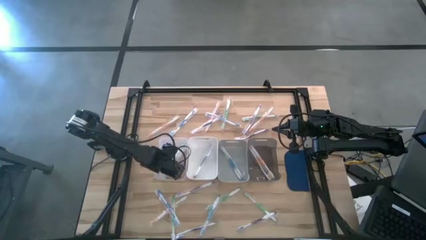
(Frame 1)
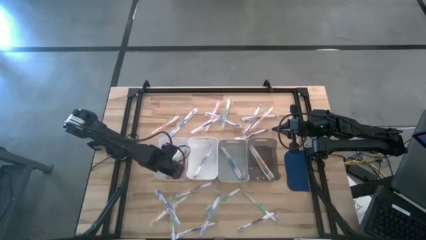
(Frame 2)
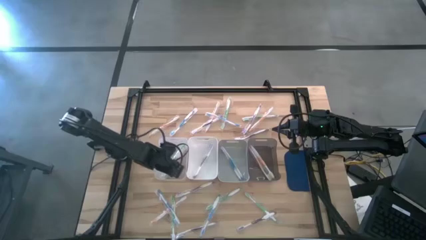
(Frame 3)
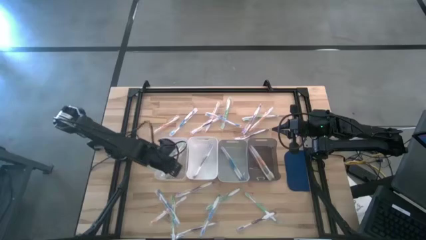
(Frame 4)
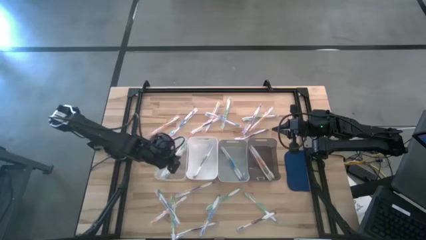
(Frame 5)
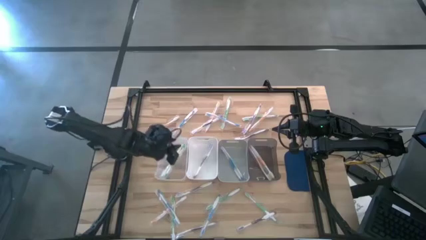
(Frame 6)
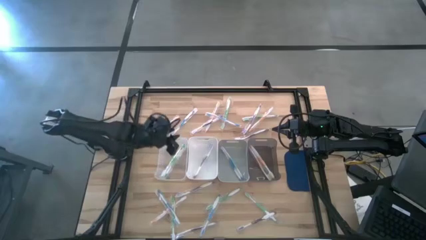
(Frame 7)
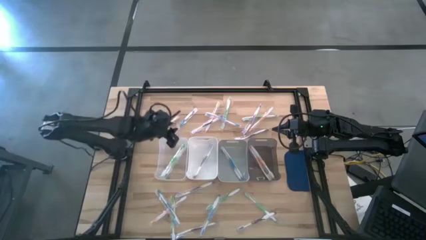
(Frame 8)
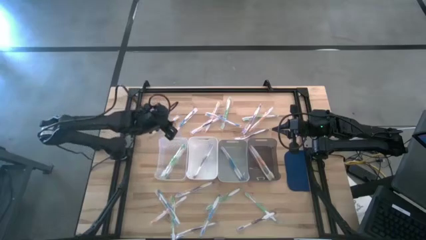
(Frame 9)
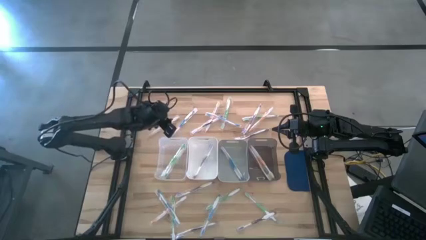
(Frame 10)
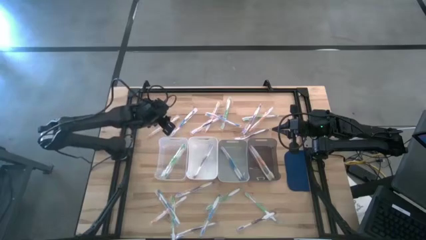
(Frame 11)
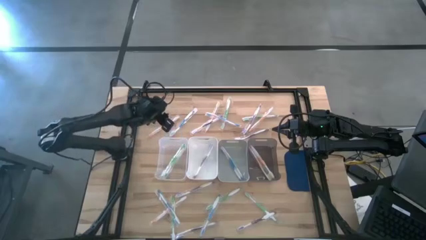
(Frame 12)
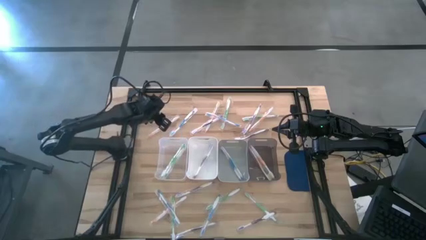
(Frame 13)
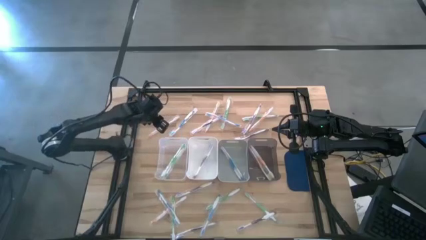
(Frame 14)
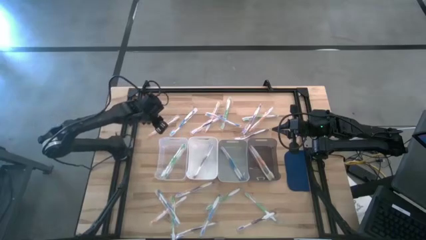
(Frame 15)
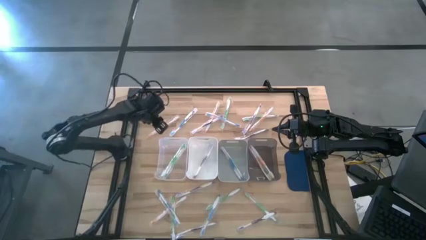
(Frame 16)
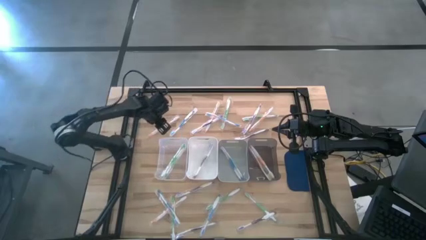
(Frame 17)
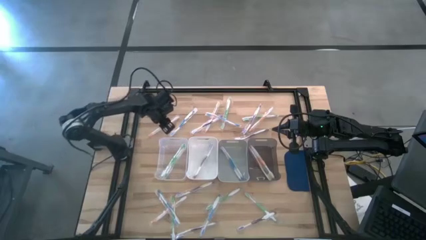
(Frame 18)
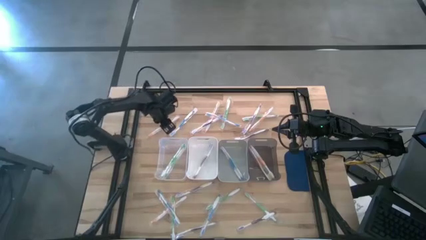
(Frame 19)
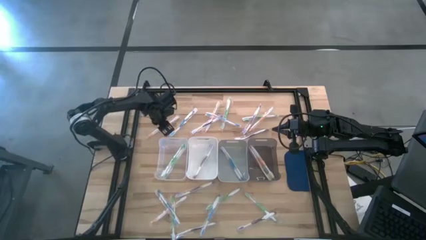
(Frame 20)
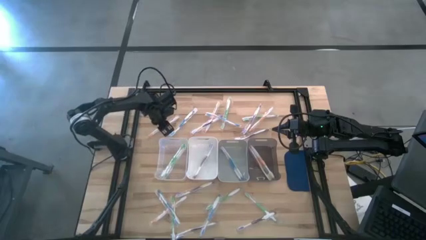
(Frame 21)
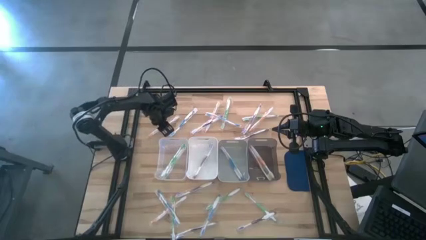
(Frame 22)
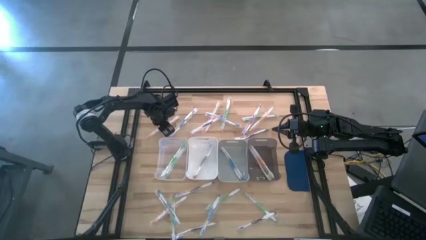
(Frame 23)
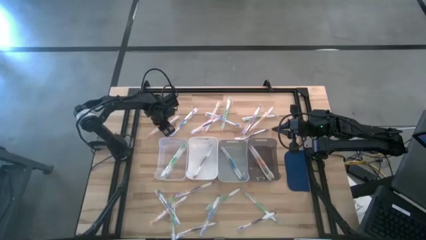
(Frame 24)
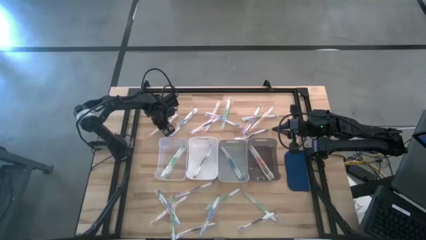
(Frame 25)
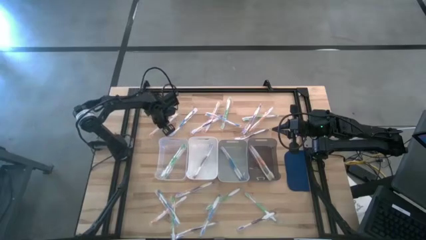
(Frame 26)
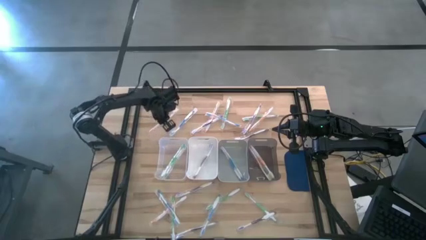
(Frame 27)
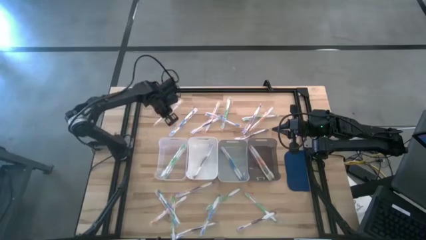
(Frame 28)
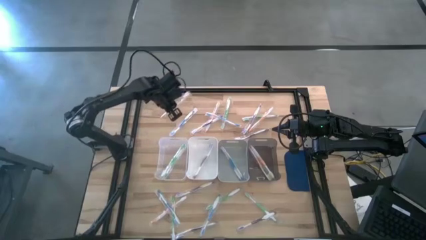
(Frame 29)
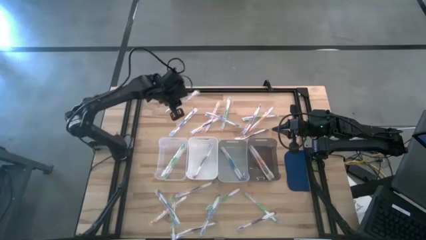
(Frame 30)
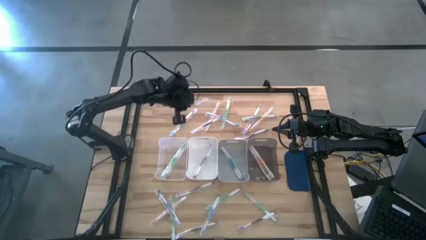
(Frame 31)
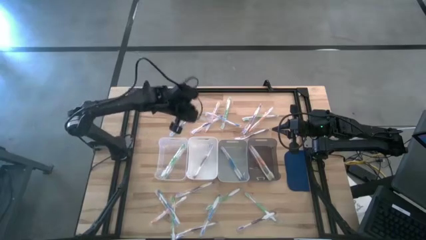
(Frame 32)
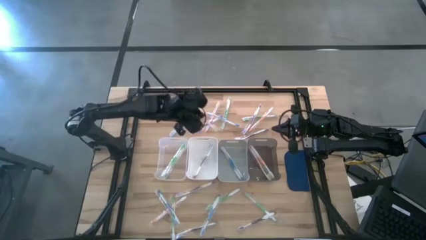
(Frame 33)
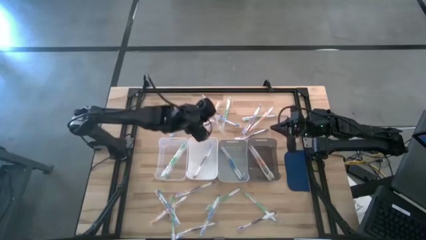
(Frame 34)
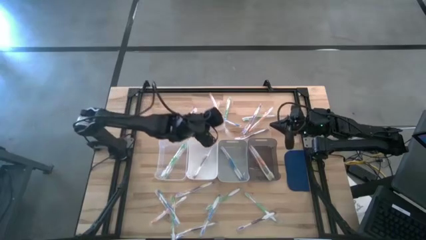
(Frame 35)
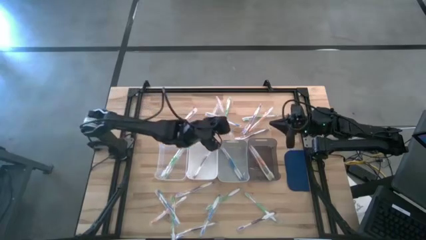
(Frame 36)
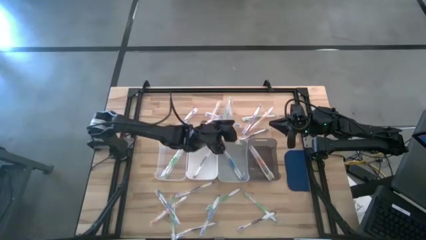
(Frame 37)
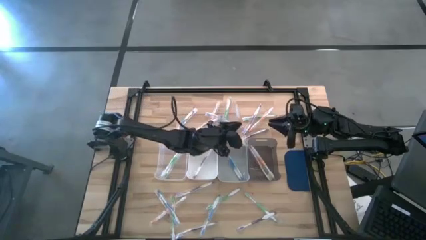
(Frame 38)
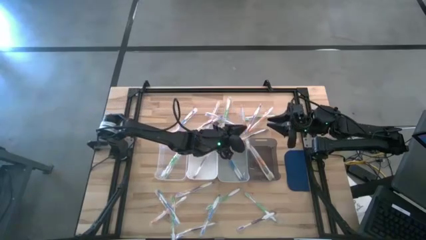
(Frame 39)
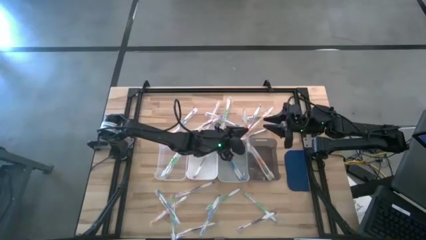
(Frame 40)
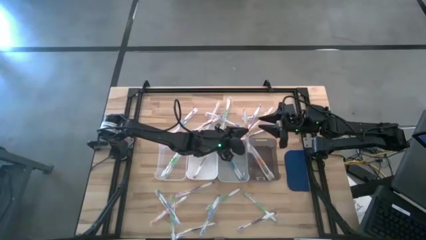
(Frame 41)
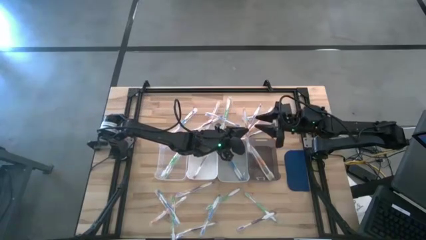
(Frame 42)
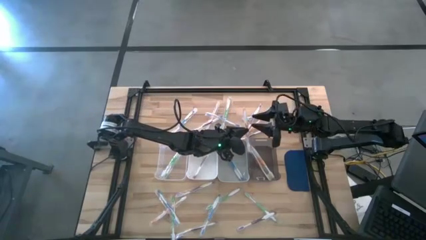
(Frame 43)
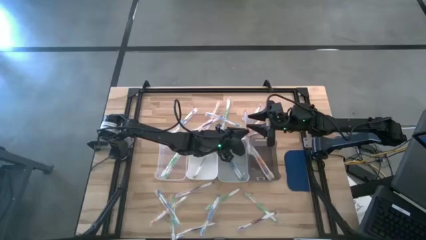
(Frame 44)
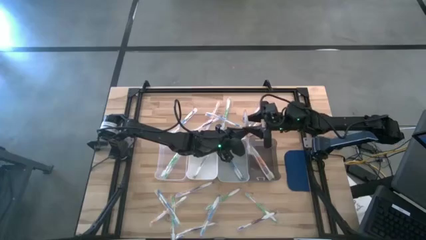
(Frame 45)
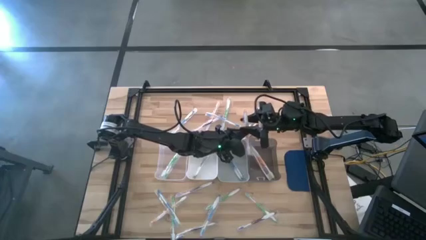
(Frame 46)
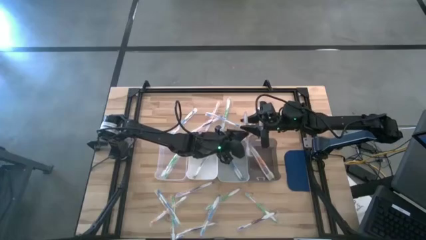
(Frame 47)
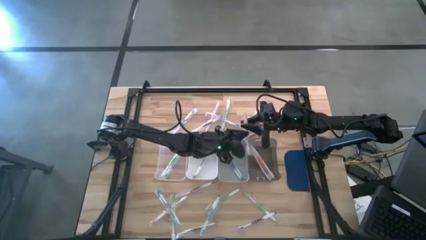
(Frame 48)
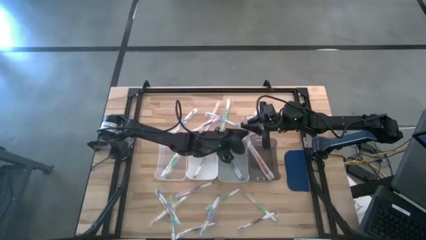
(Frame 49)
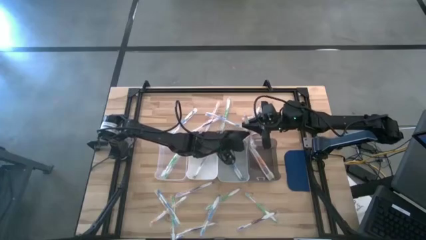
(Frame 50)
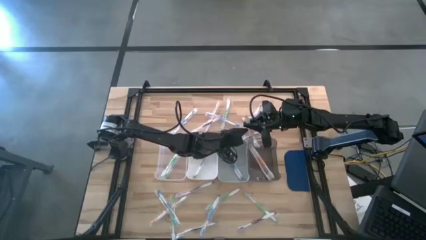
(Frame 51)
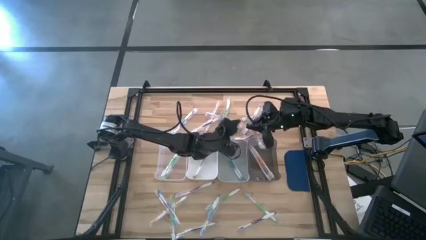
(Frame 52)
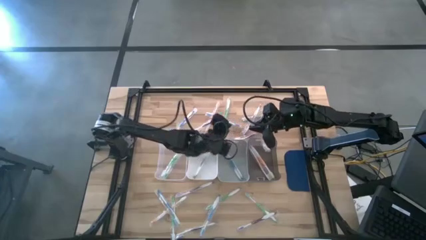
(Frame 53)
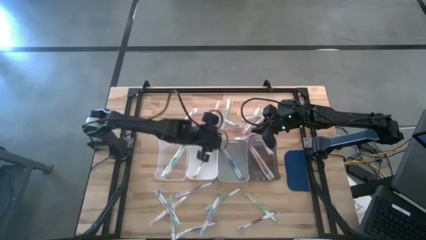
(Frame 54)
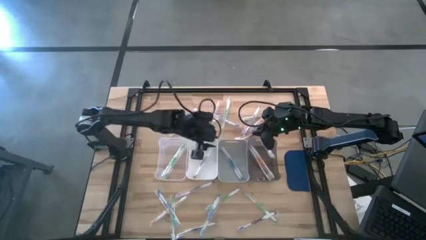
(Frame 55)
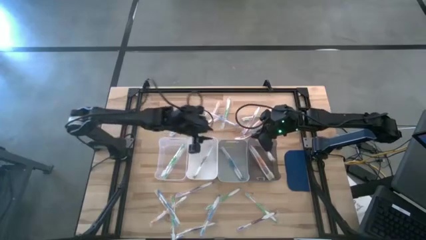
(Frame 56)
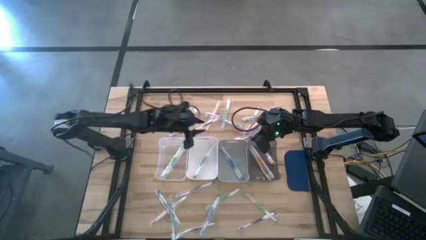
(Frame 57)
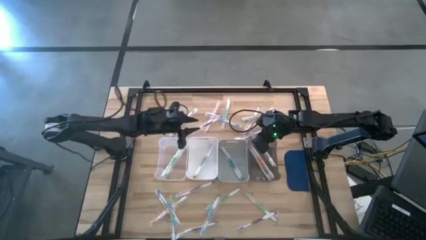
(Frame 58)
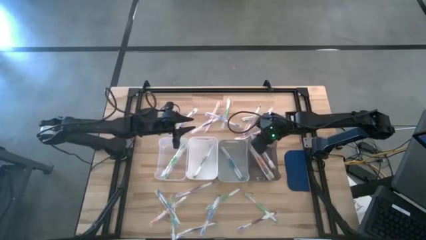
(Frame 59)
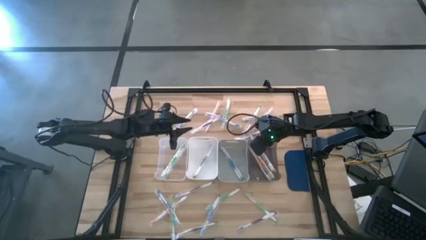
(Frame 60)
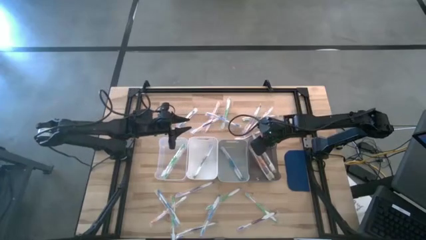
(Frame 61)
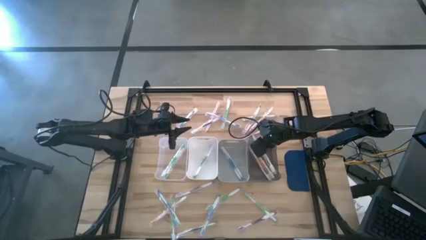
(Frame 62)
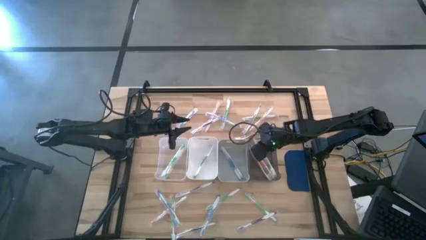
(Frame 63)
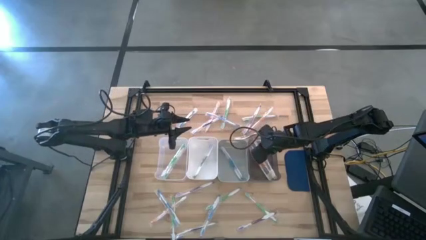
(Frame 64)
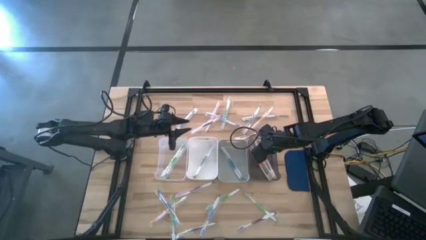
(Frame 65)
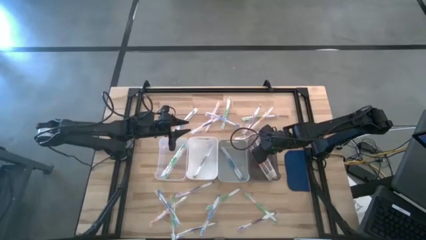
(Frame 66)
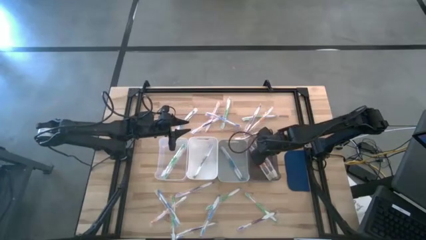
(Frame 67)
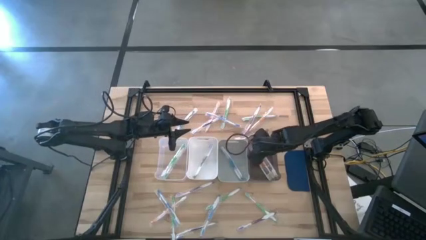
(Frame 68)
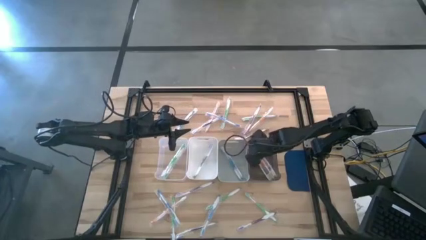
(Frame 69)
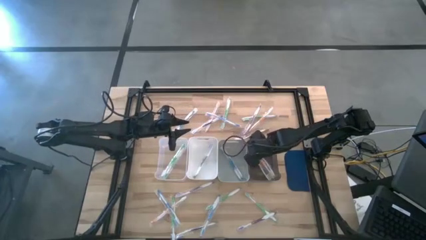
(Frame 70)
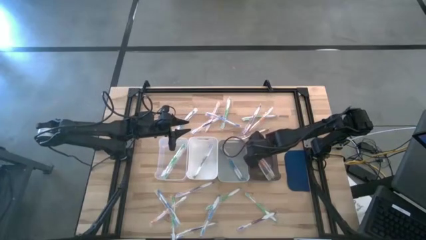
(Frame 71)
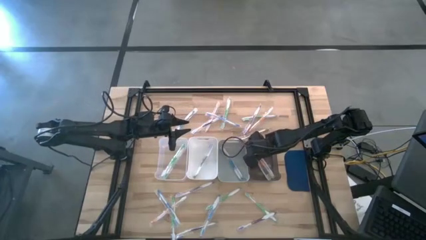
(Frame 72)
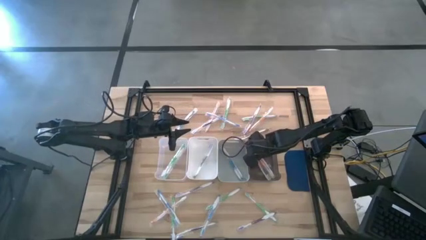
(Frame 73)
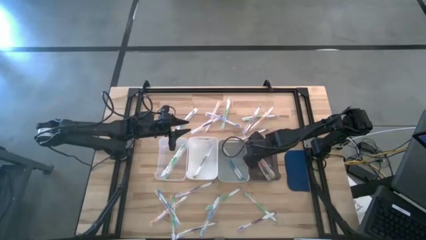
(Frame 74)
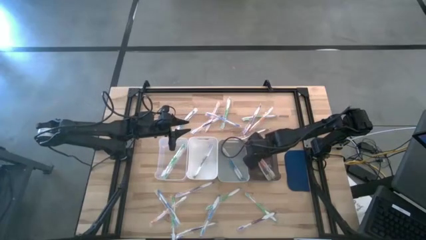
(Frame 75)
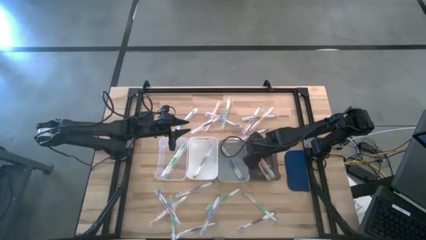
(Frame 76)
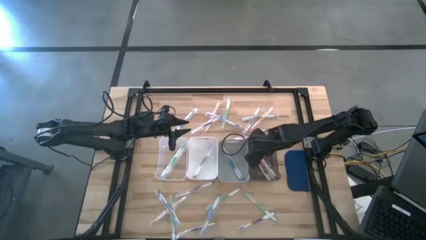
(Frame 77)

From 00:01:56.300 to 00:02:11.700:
Task: Pick & Place Toothbrushes
Put the orange toothbrush into the black bin
